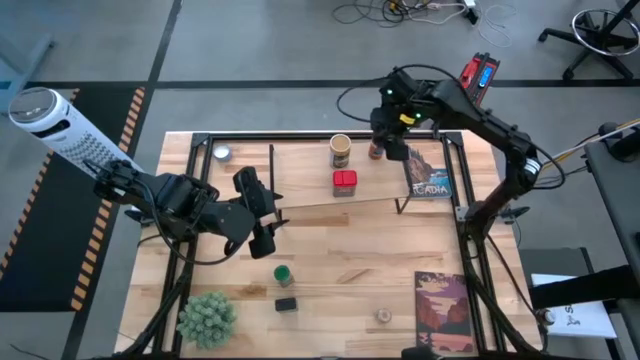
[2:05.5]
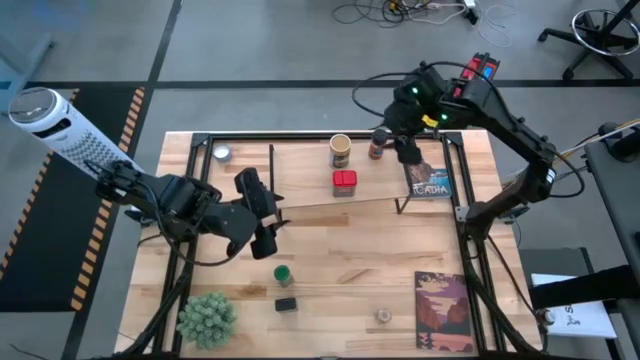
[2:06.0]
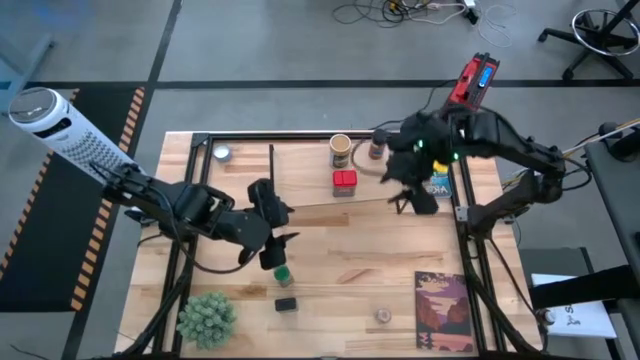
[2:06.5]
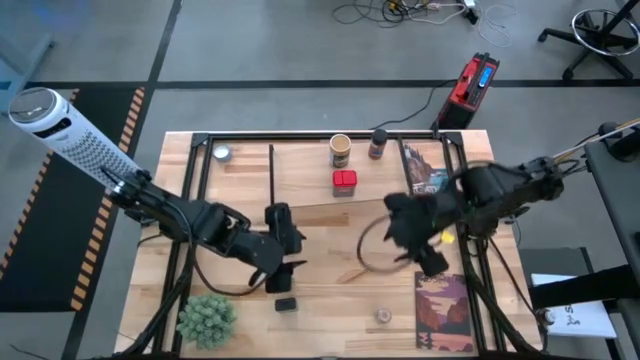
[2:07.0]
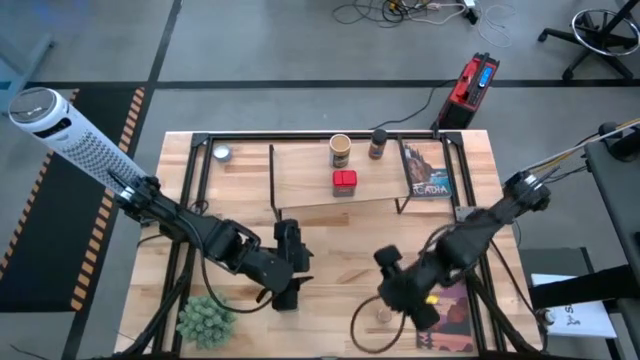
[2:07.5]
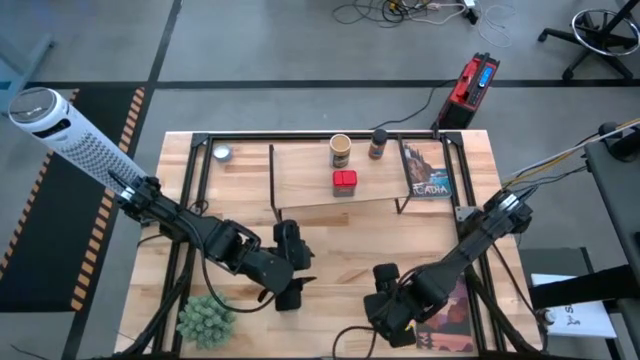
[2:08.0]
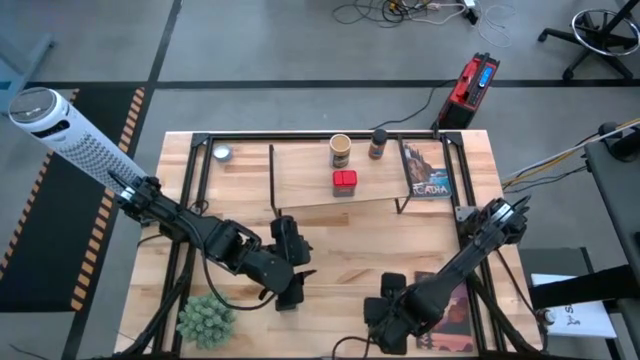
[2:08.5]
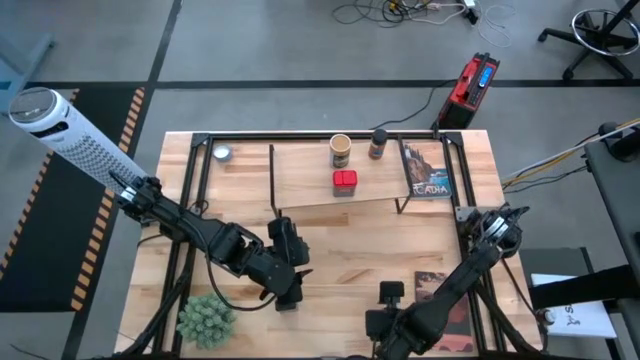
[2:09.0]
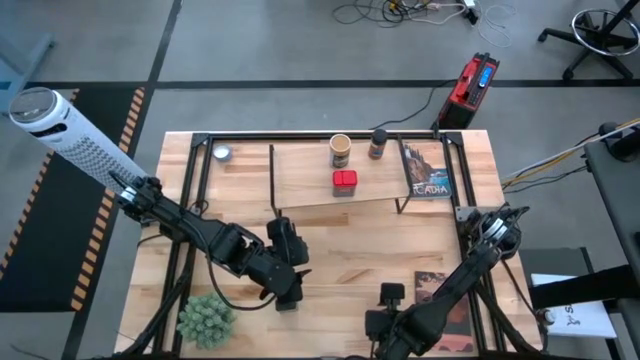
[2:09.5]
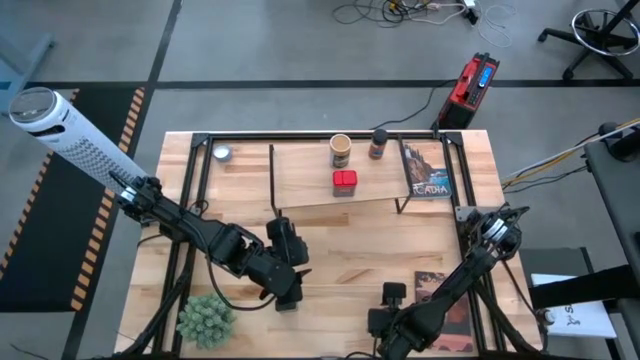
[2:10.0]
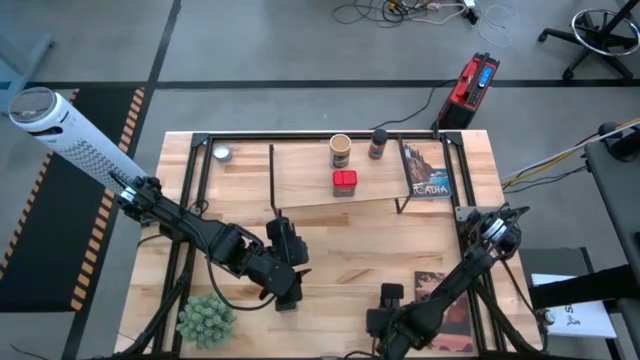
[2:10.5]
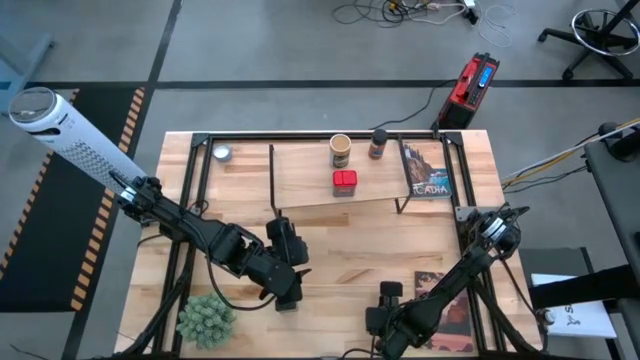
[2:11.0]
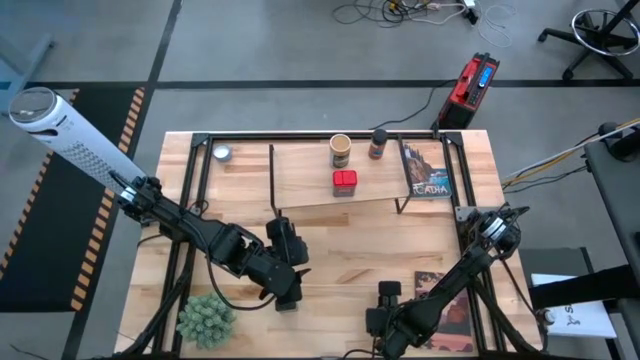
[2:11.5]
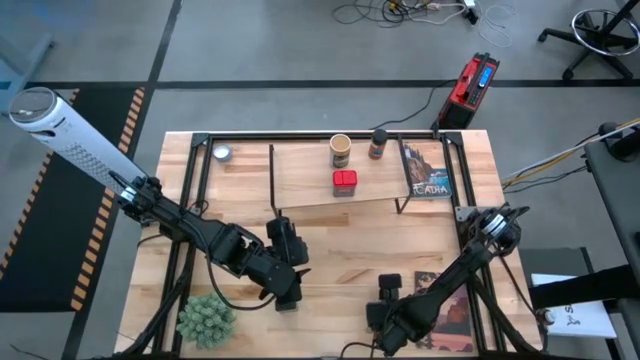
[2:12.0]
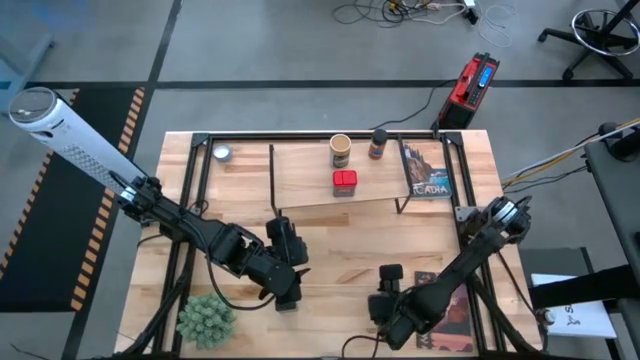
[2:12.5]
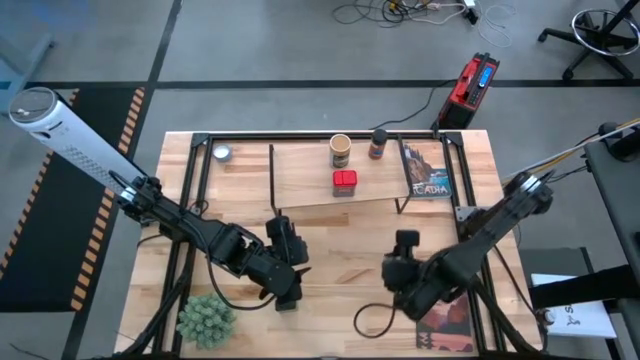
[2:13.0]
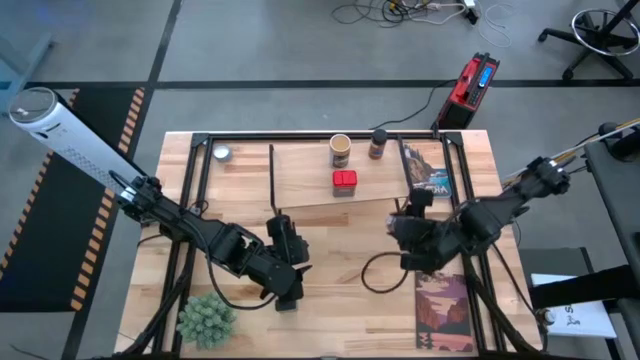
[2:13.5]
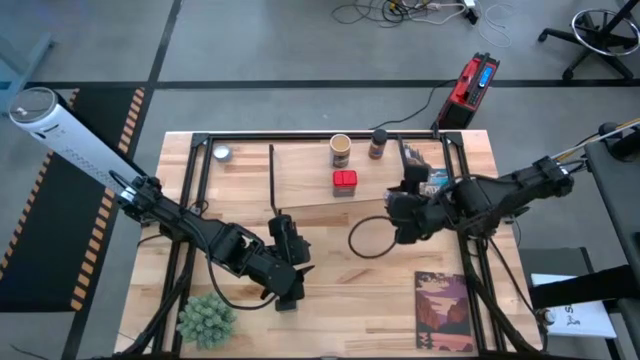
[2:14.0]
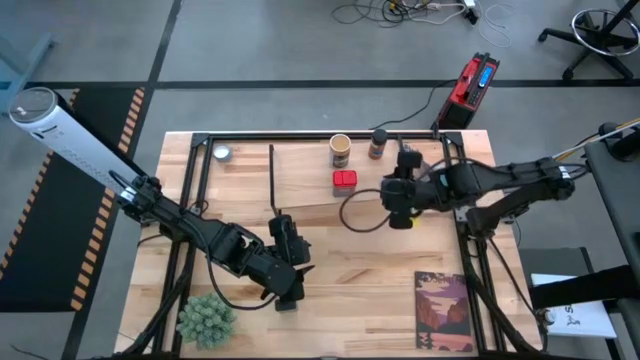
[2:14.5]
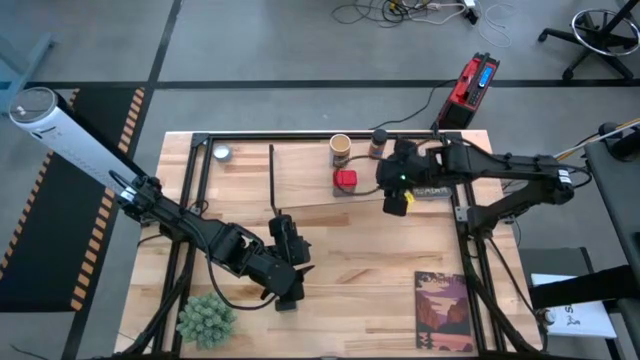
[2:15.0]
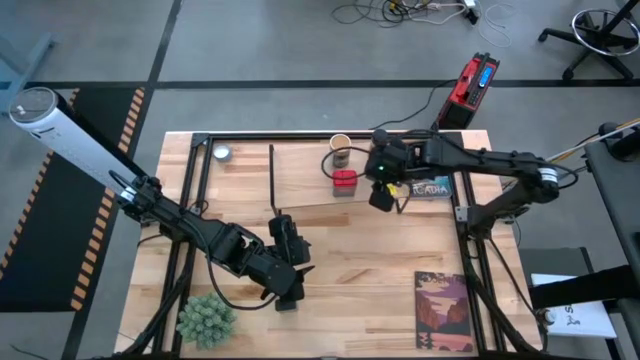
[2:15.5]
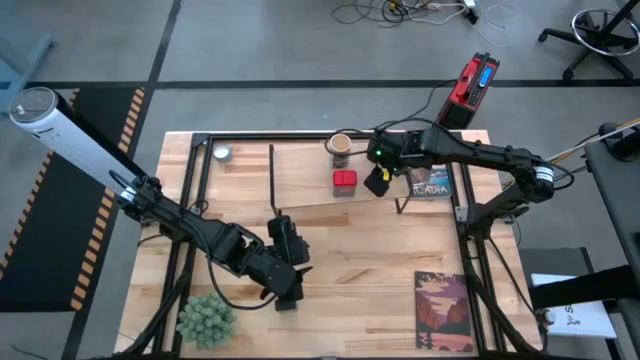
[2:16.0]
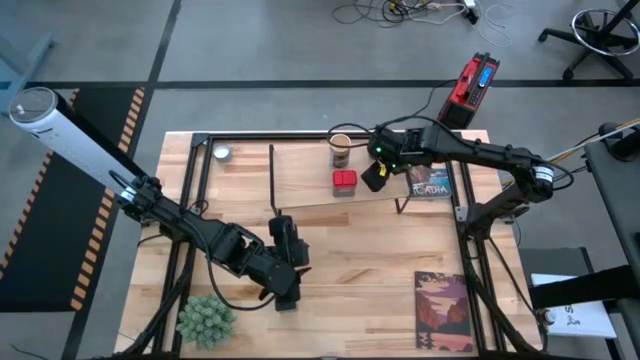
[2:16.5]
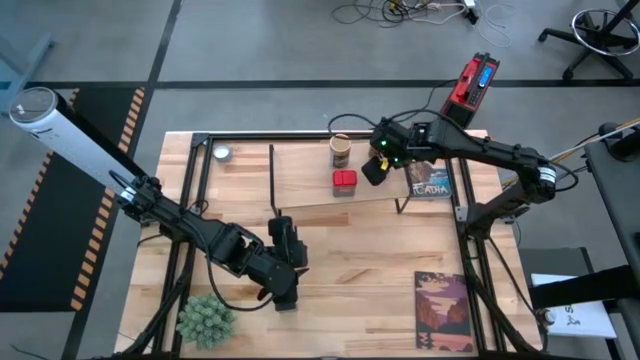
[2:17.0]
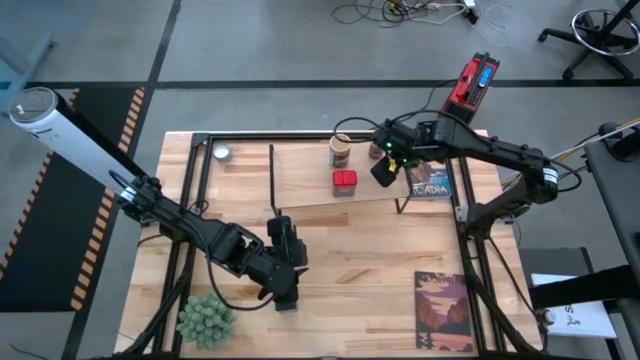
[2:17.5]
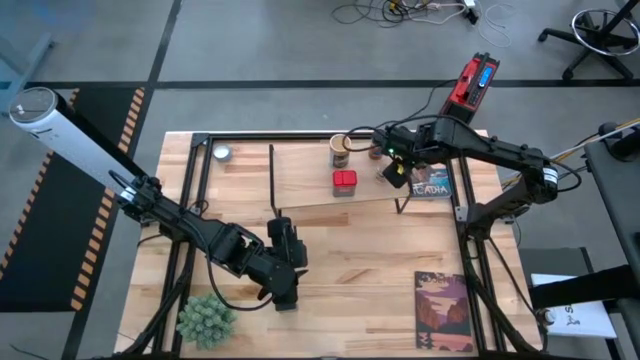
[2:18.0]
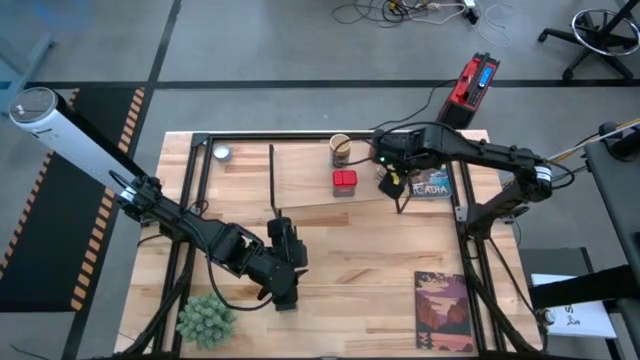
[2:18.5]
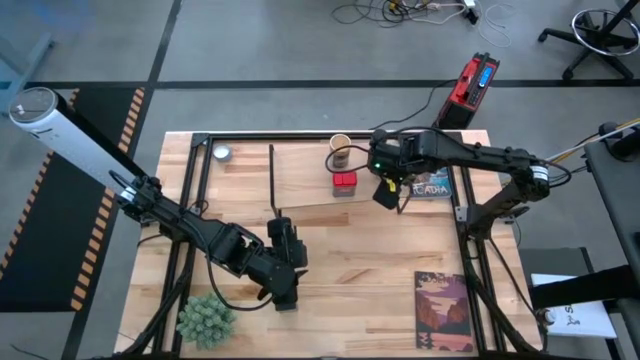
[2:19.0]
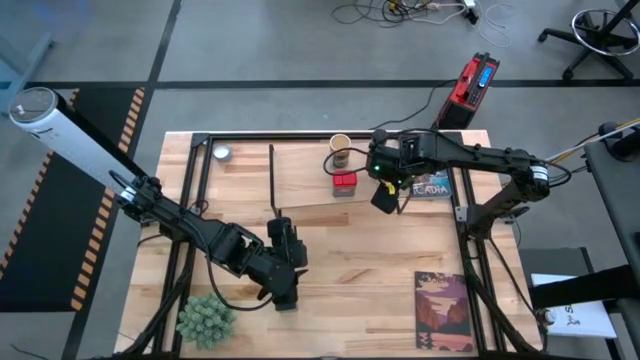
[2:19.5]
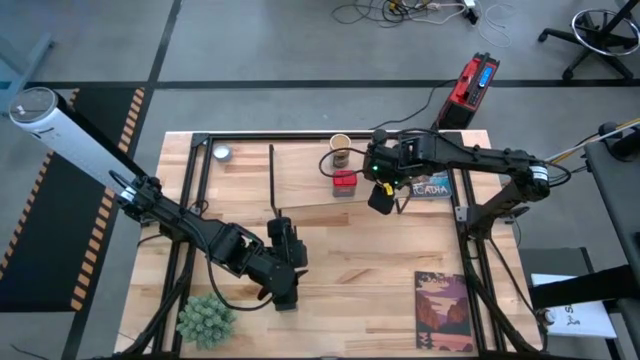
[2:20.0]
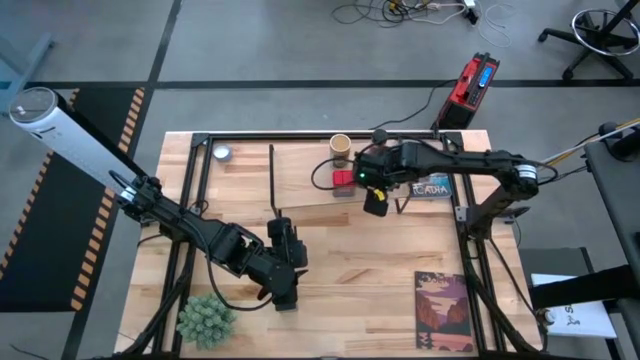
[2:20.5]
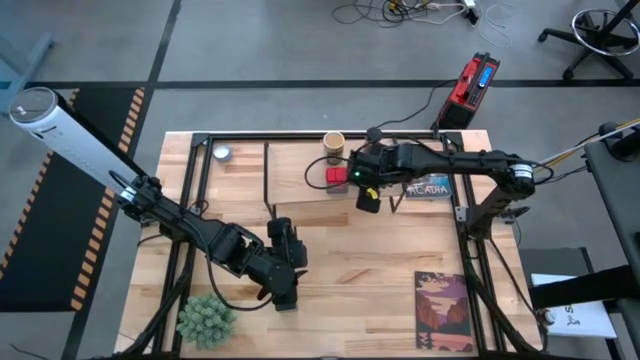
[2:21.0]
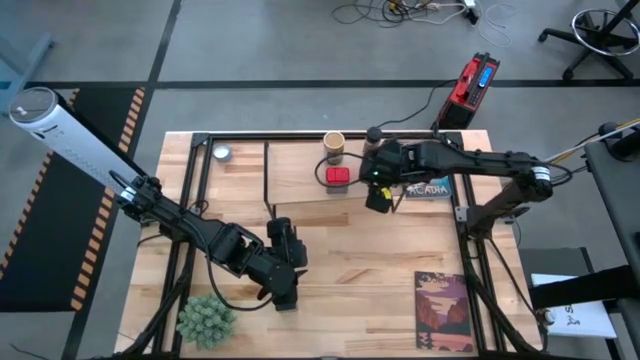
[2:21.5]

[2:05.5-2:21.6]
Task: Shelf spices
Put the brown seasoning bottle on the shelf

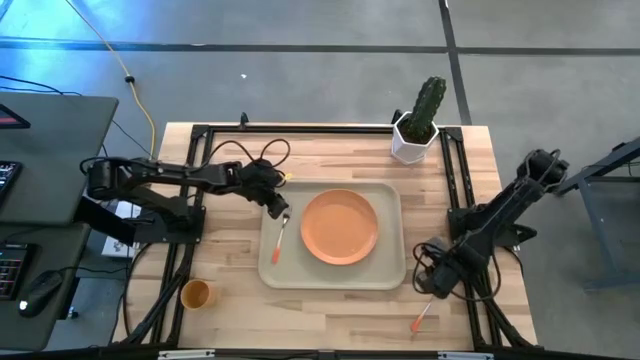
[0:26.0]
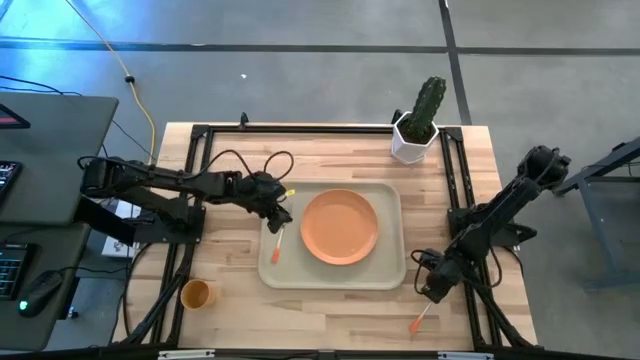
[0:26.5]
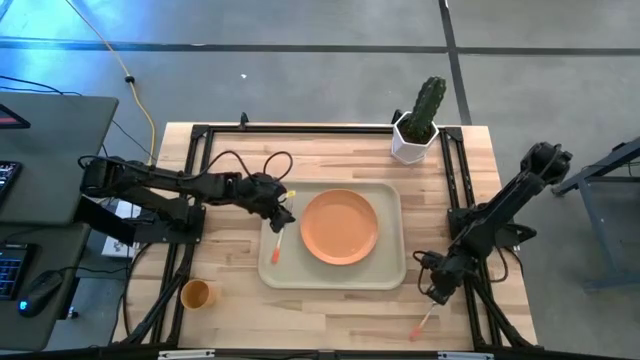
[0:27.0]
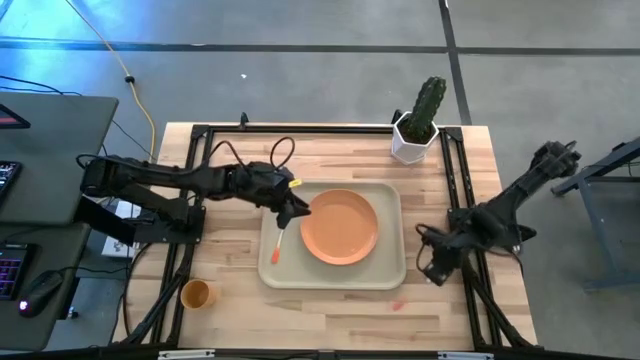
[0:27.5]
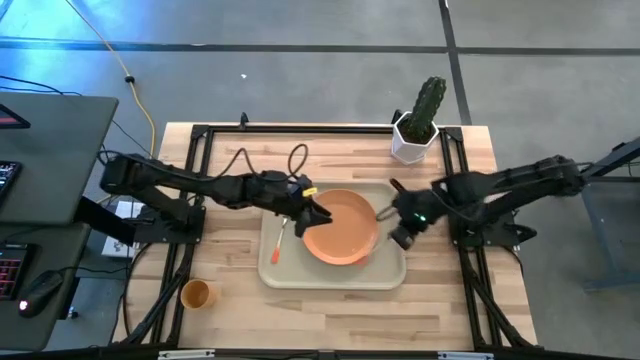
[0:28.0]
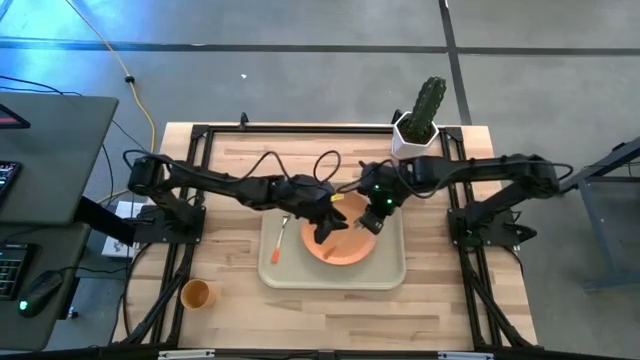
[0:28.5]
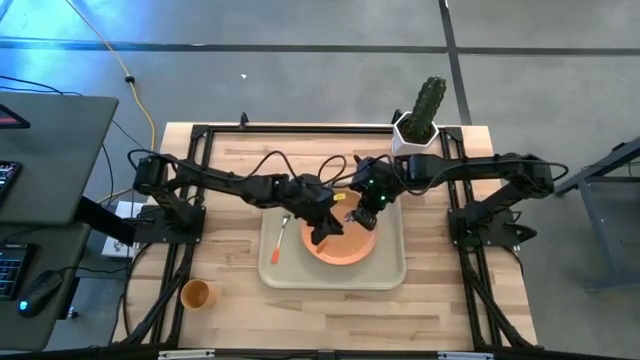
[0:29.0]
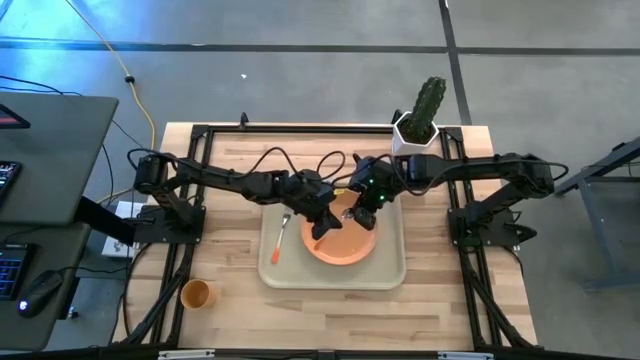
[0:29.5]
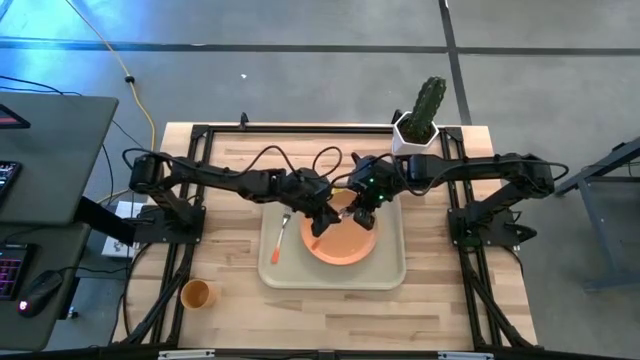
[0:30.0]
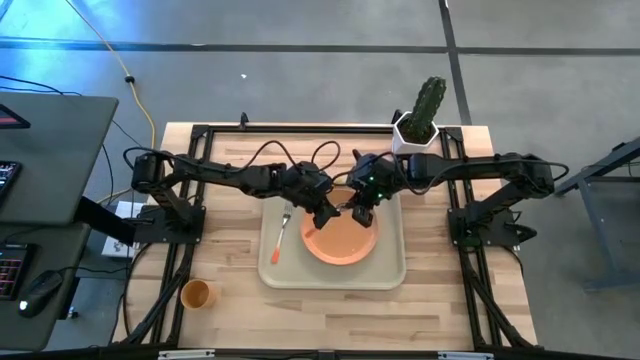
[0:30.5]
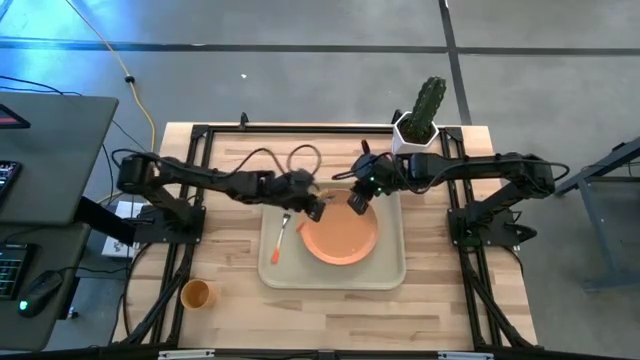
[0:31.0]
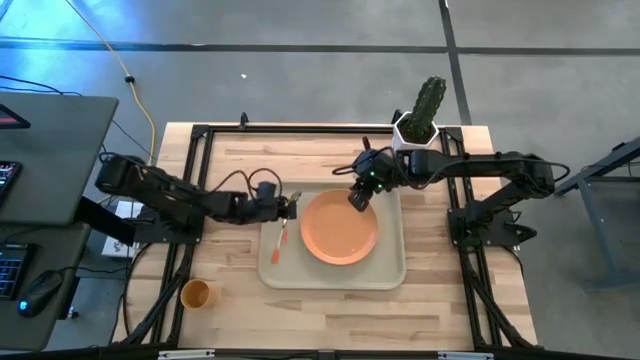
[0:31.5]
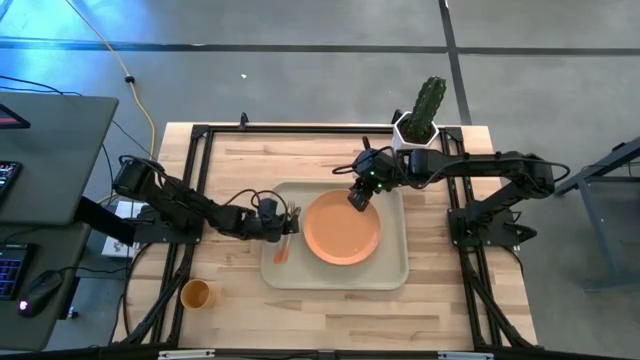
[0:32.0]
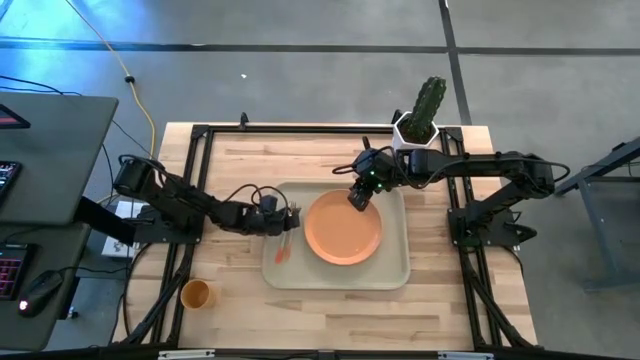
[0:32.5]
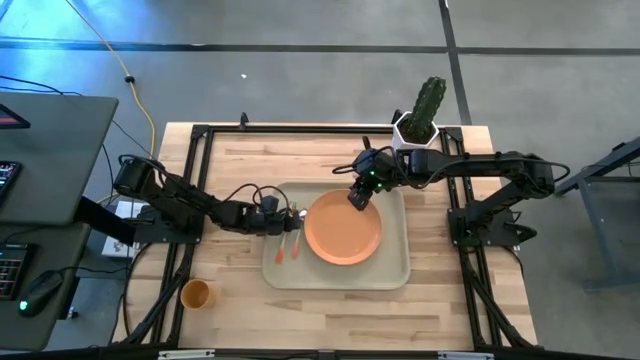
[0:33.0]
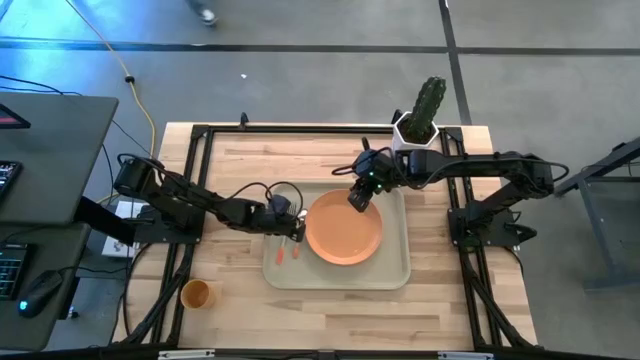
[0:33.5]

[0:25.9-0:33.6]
Task: Pick and place plate/cup/fork/spoon on tray
Put the orange spoon on the light brown serving tray to the left of the orange plate
